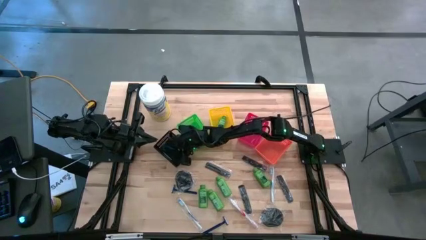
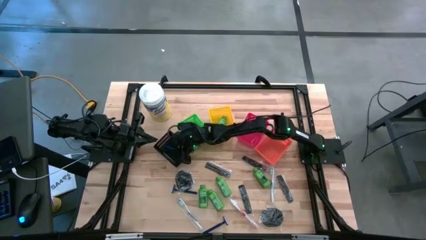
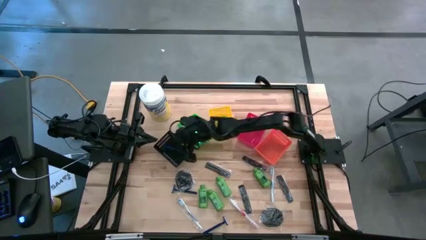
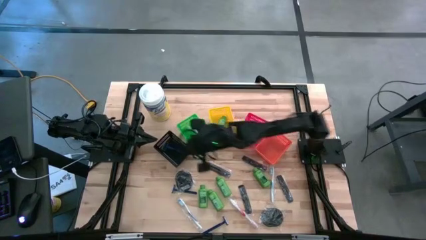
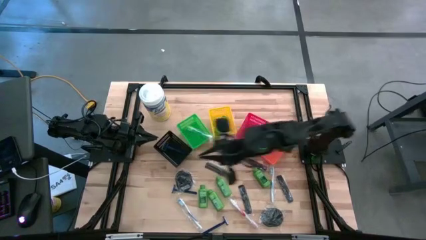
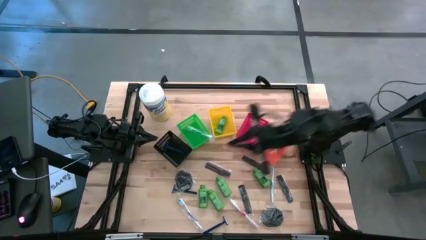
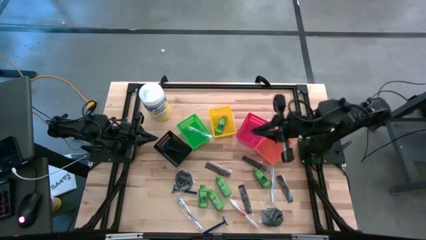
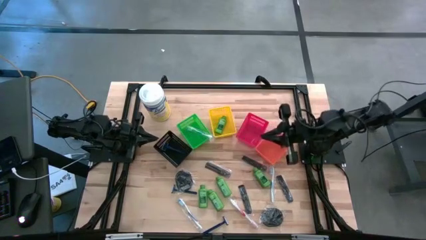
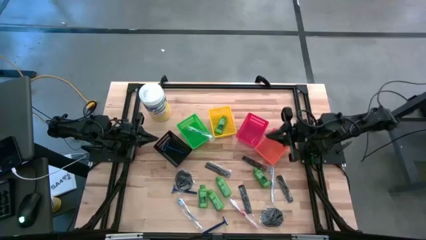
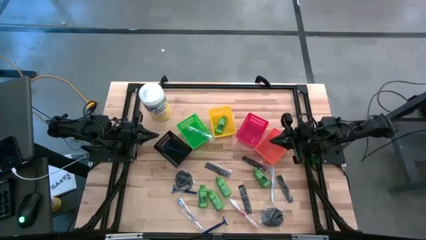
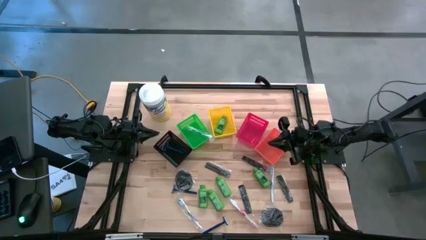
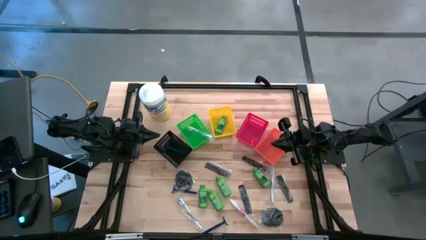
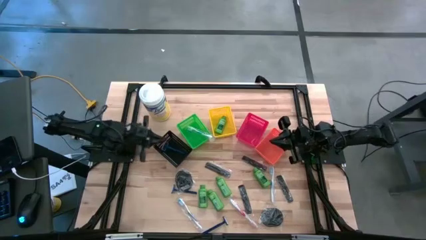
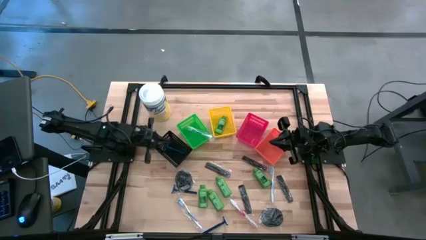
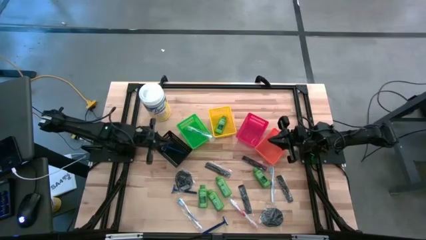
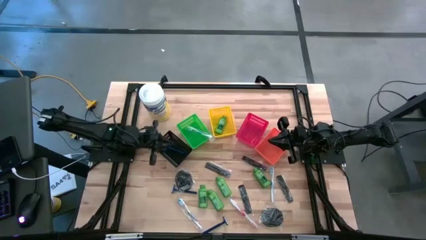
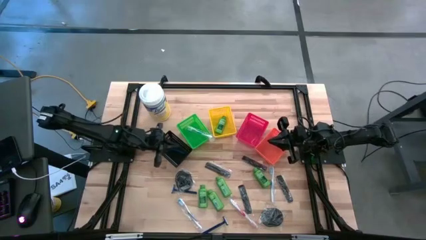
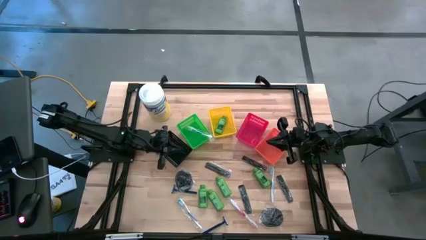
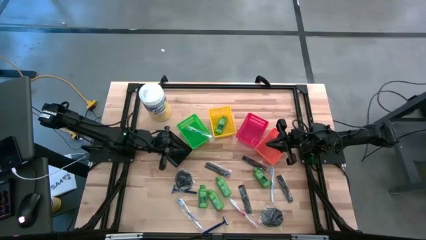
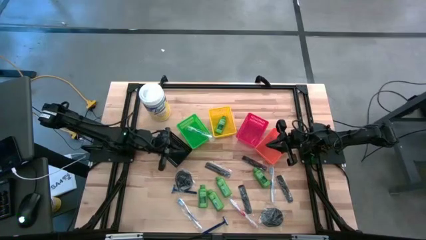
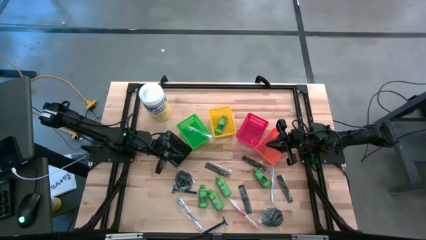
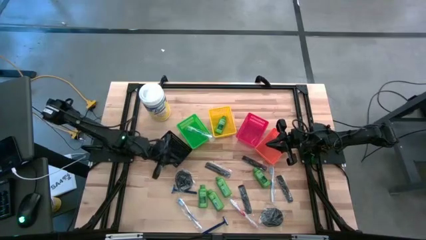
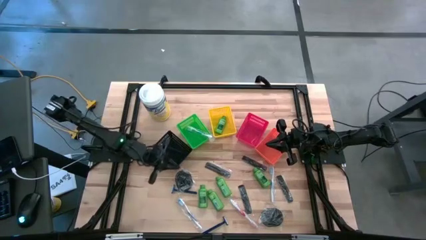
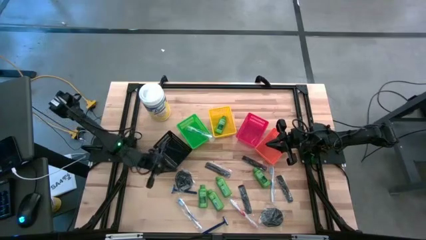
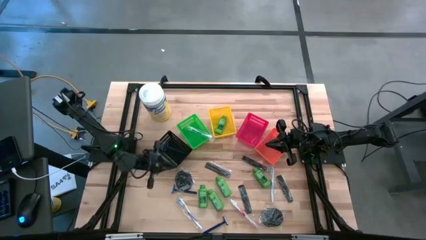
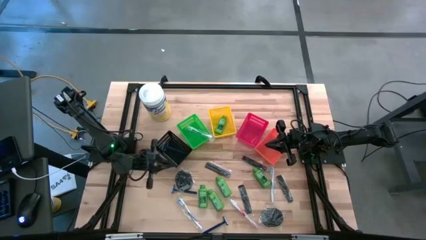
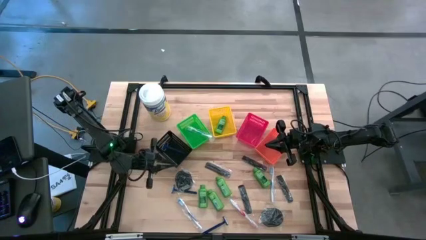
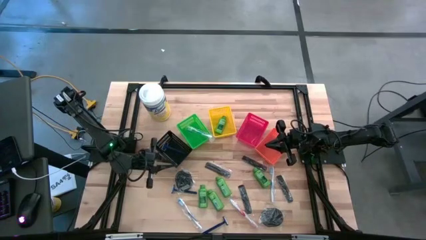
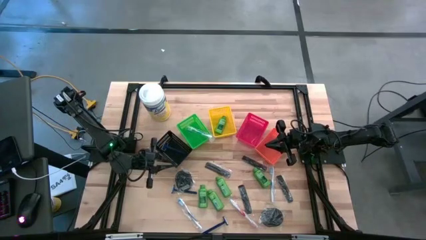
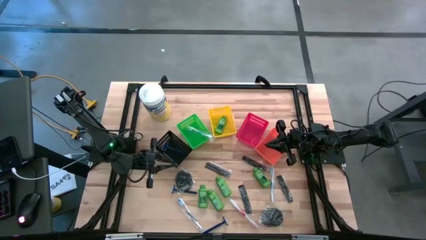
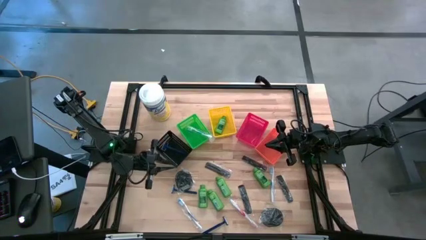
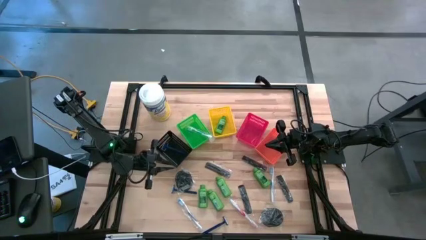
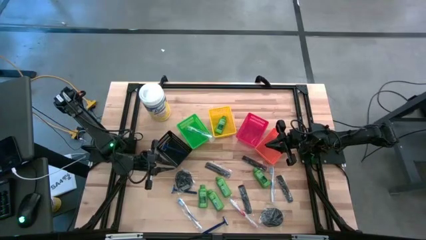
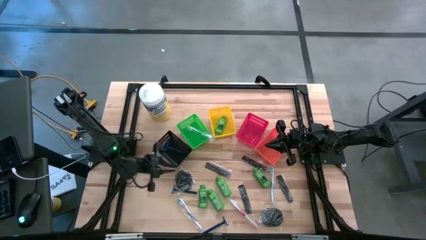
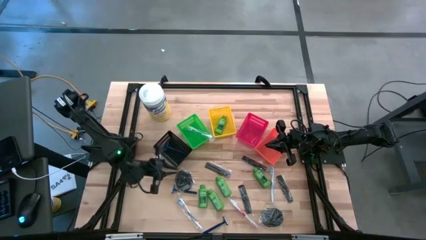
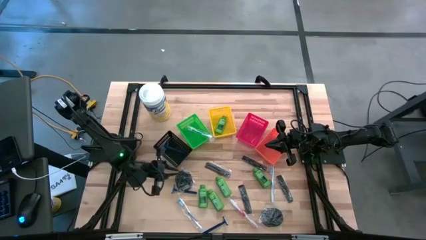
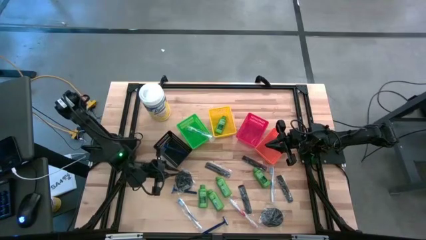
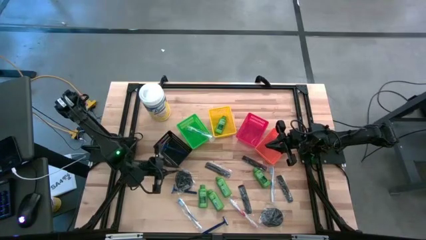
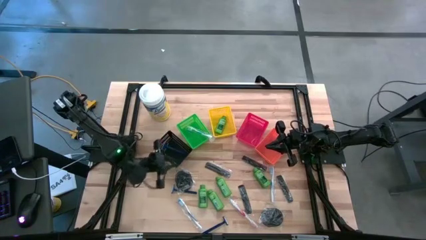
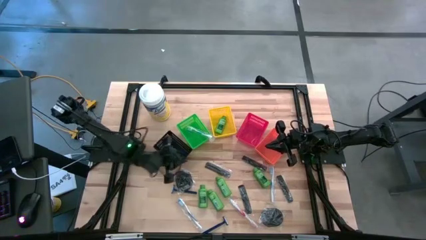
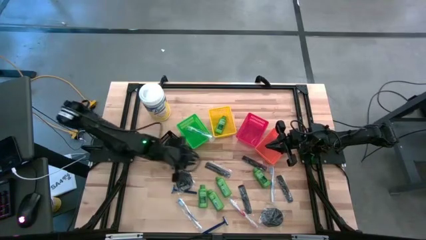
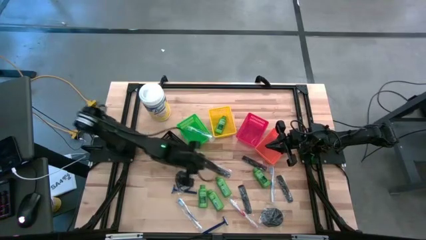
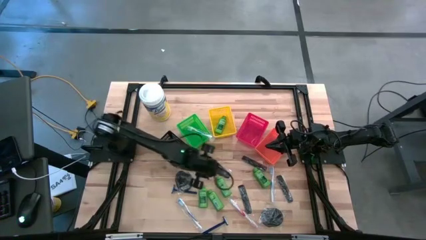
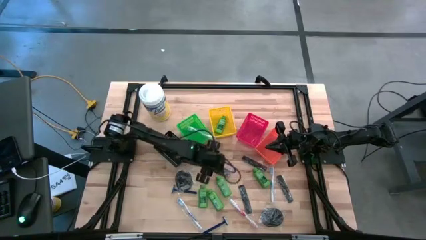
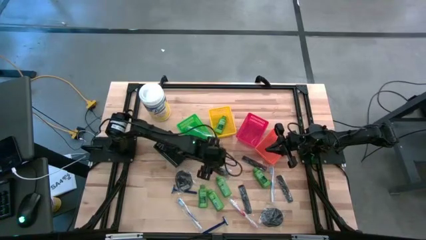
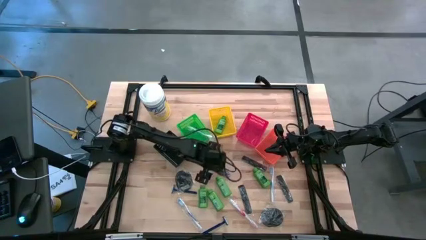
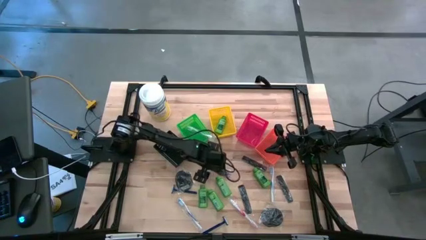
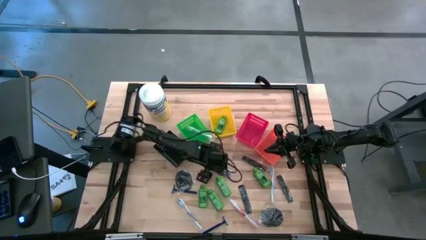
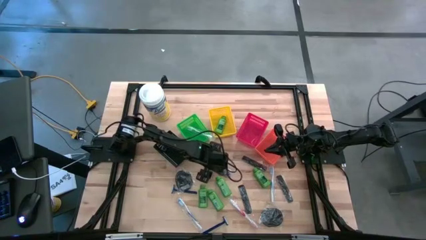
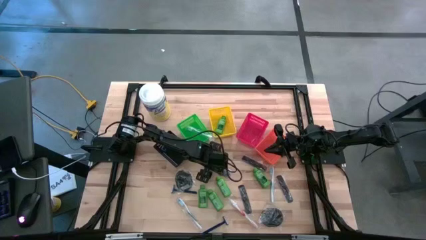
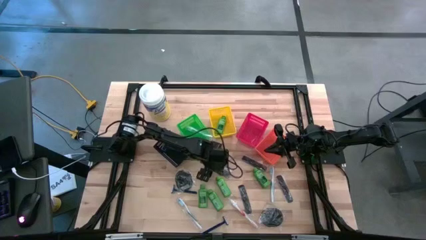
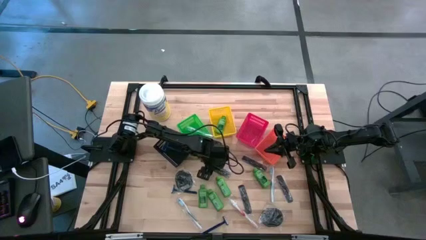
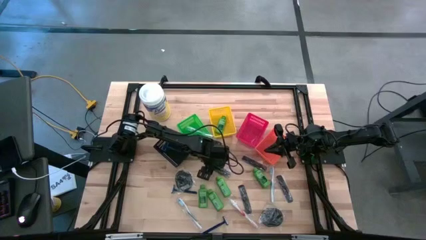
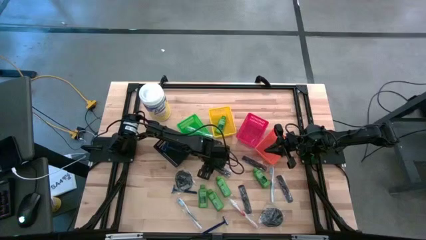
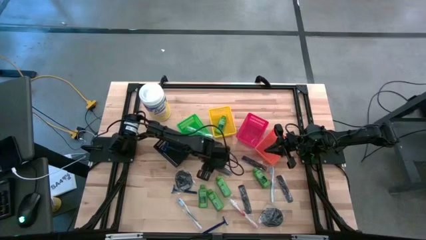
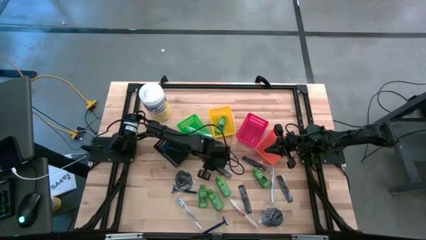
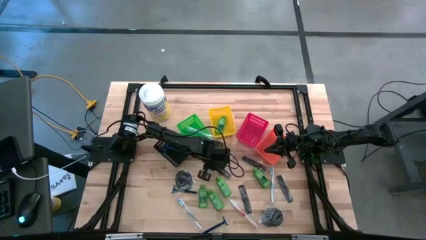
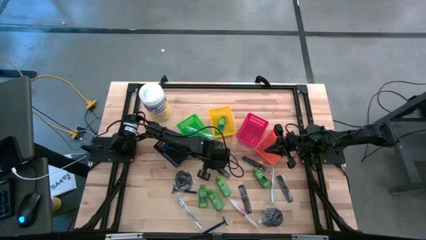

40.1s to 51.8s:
Task: Pick & Place Travel size toiletries
Put the black hair comb into the red bin
